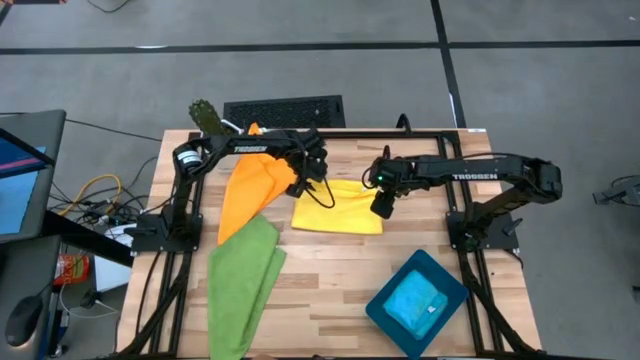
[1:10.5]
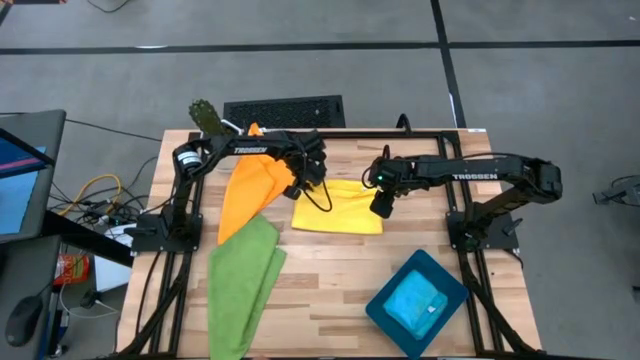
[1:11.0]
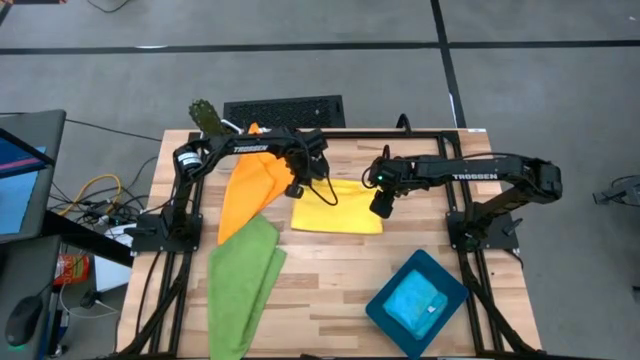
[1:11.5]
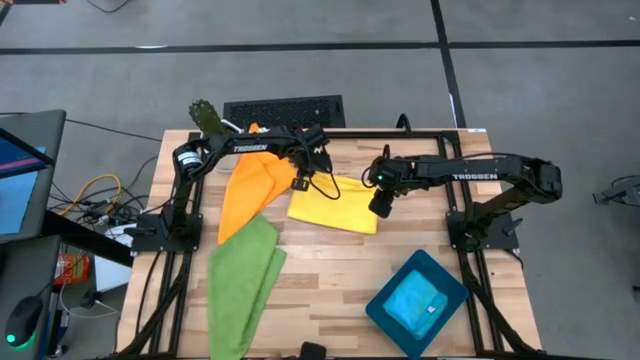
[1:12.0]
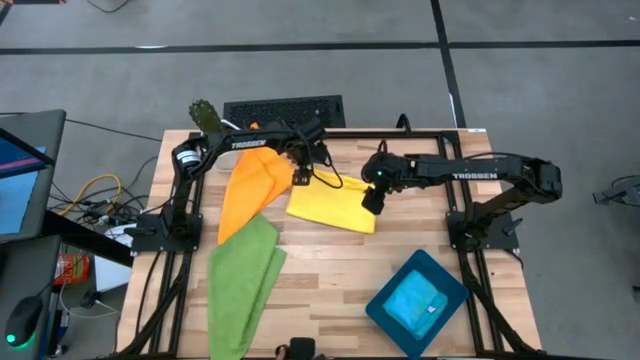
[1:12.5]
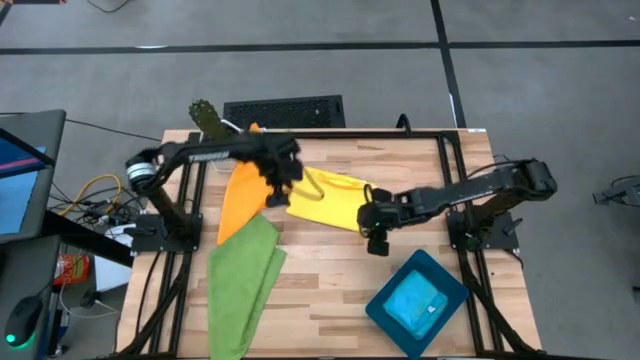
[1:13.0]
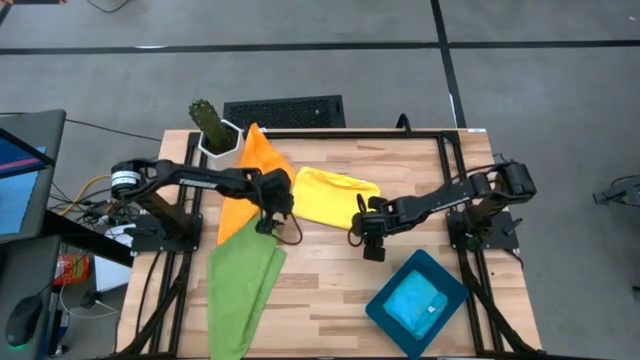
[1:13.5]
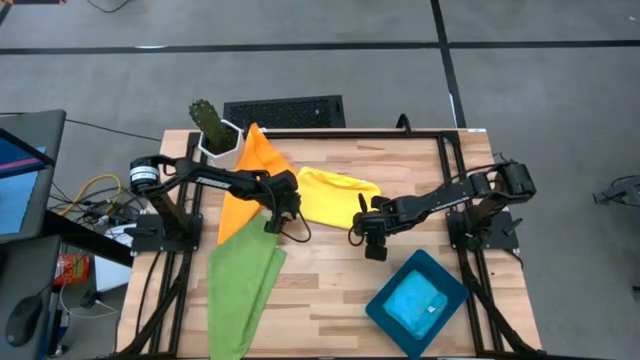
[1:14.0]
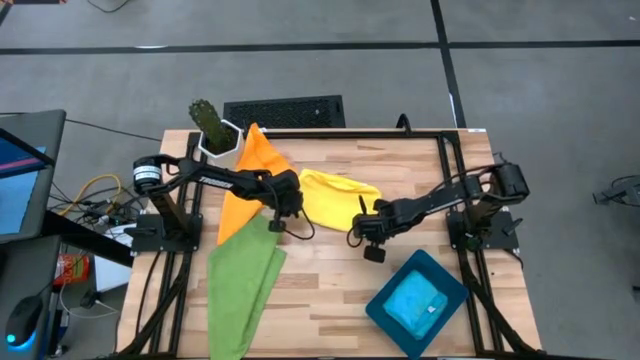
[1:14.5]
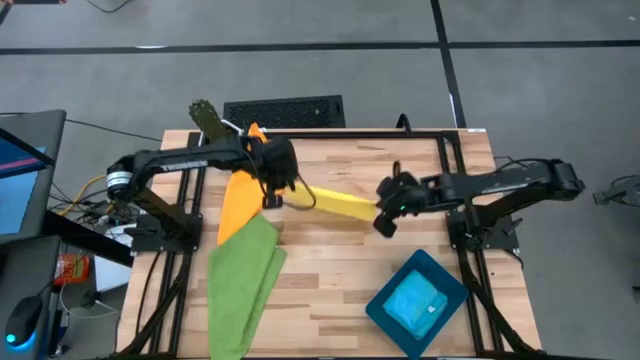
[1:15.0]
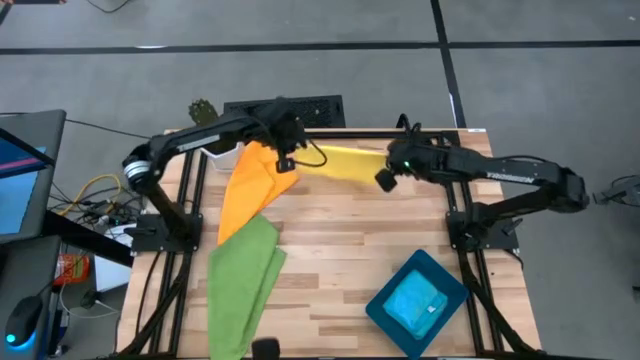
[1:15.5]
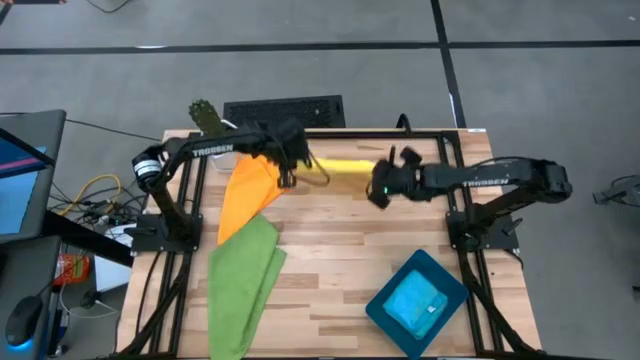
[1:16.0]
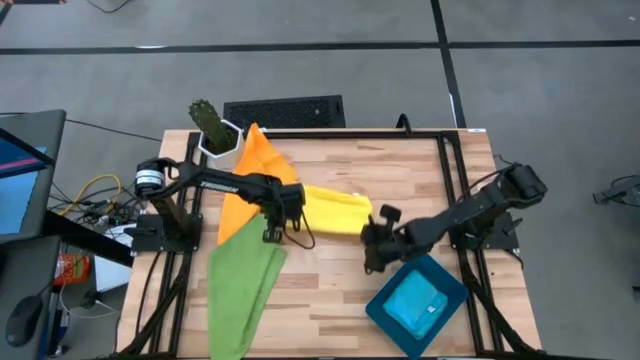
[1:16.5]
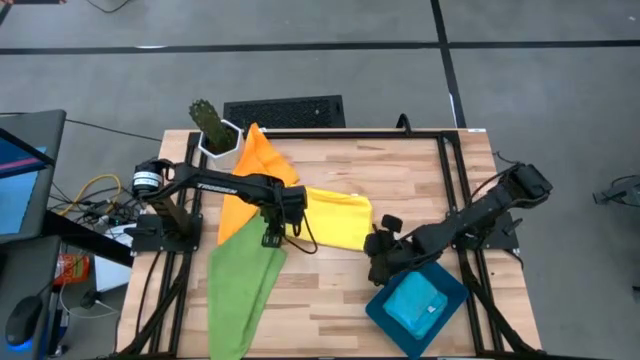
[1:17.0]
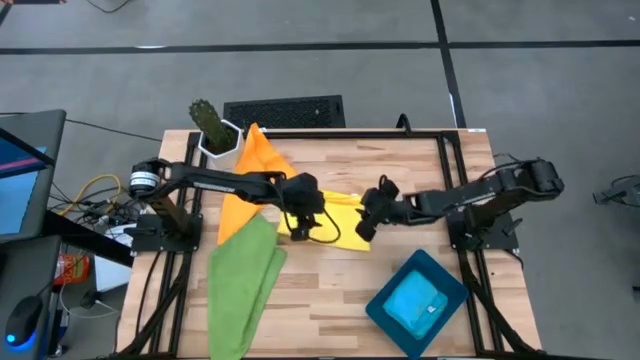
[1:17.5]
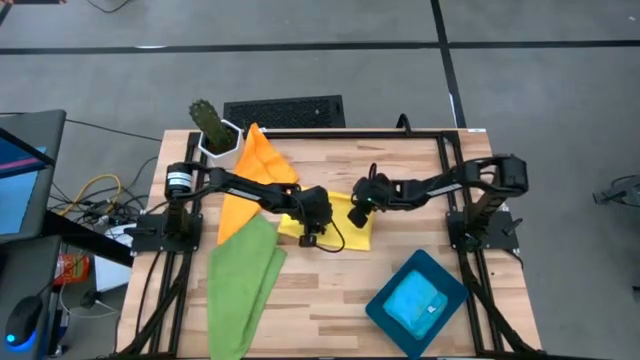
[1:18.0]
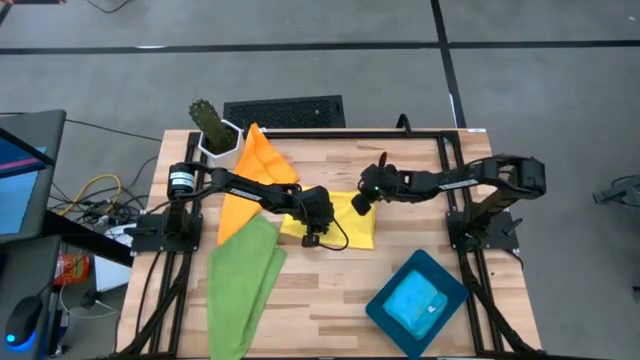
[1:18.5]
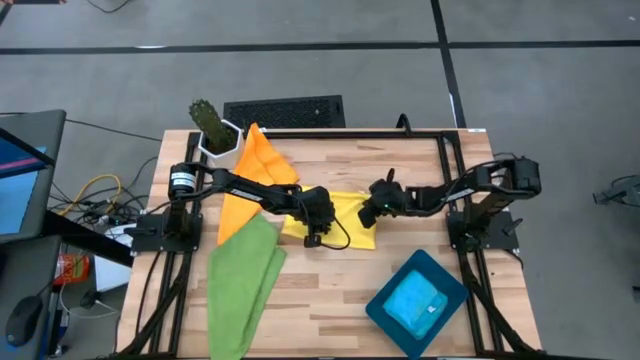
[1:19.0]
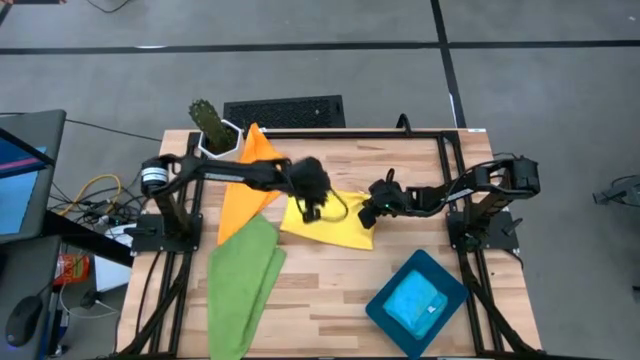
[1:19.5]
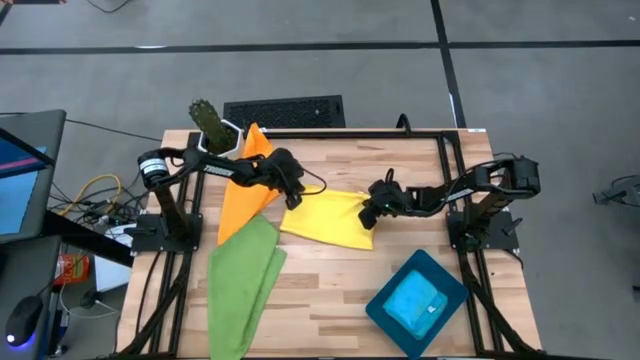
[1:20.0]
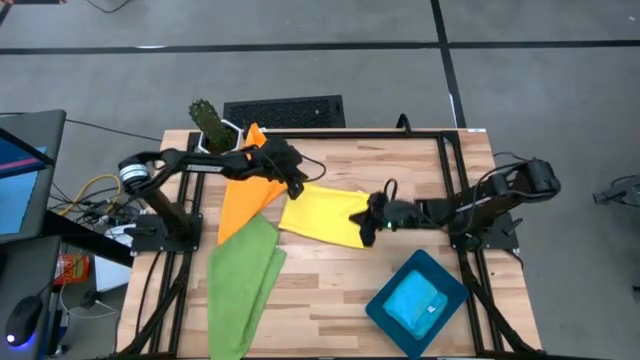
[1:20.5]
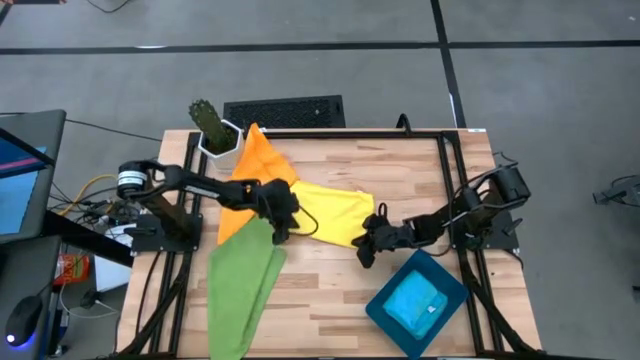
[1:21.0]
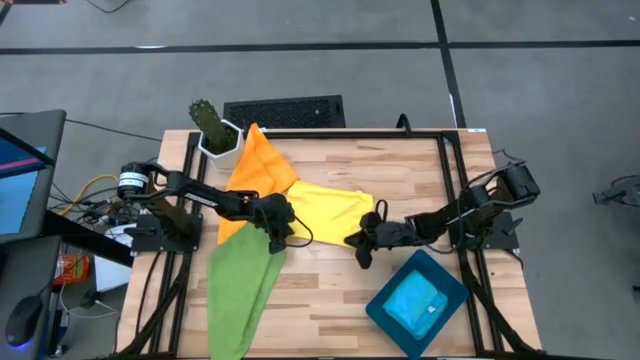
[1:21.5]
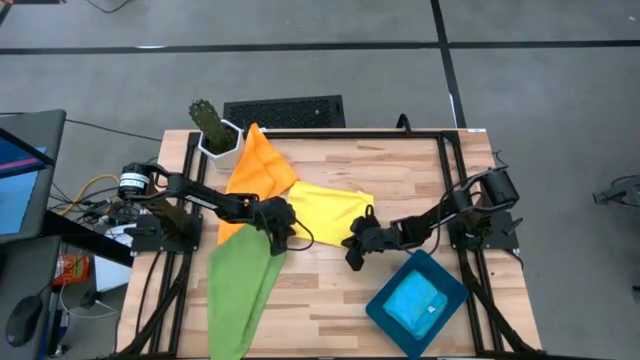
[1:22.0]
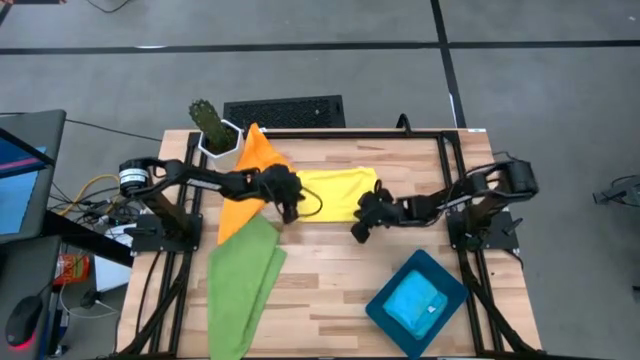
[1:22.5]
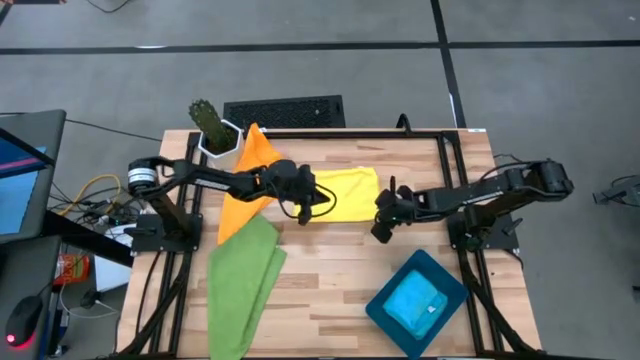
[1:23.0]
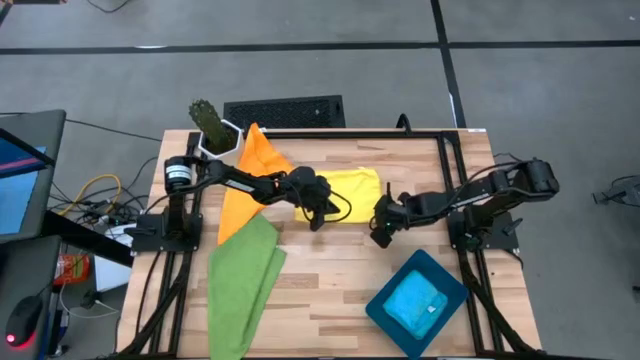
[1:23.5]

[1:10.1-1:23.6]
Task: Fold microfiber towels
Fold the yellow microfiber towel

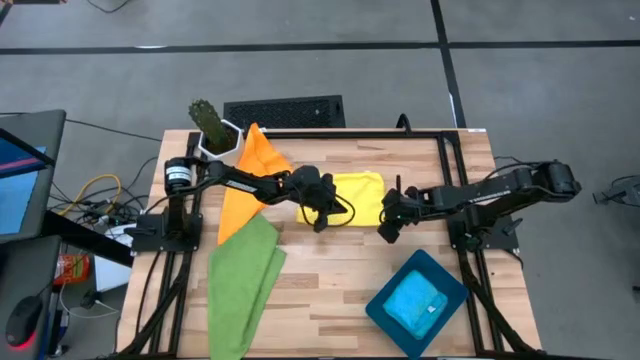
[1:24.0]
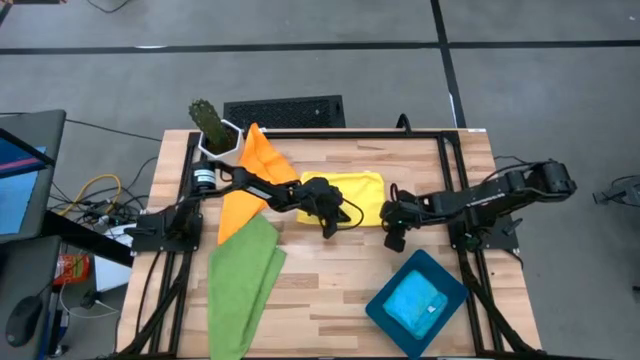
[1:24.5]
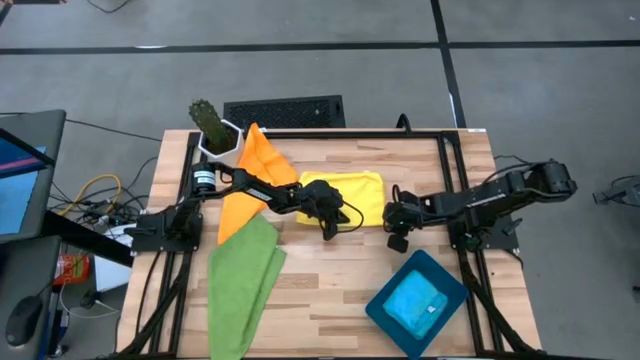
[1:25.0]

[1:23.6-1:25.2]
Fold the yellow microfiber towel

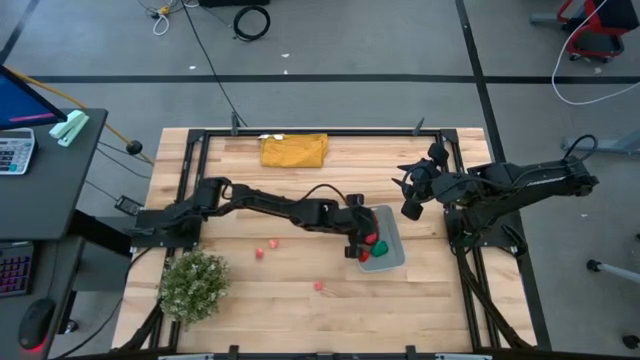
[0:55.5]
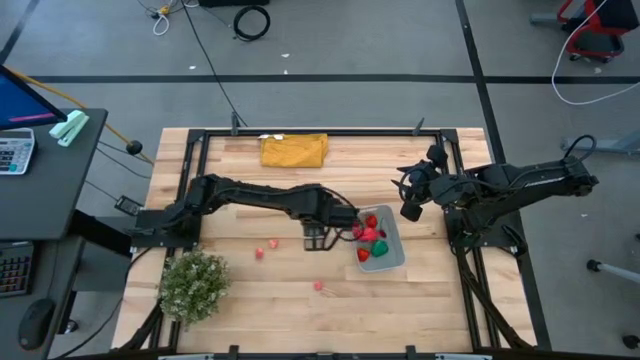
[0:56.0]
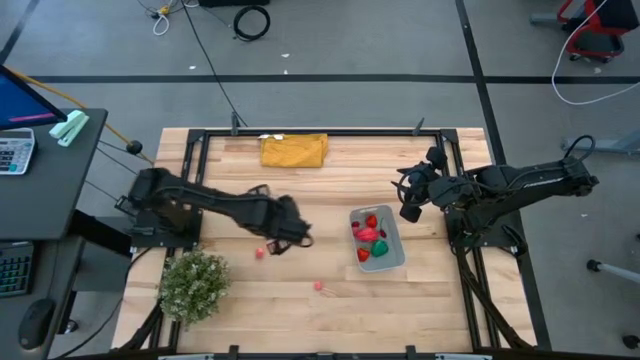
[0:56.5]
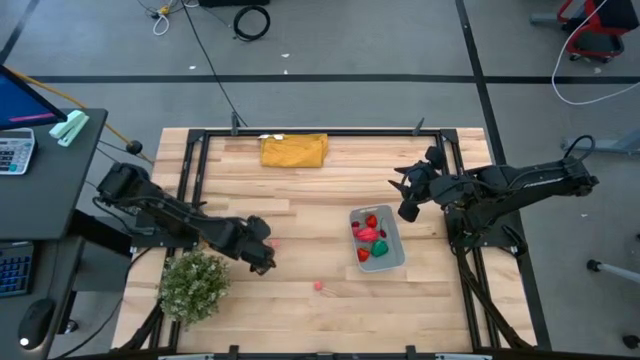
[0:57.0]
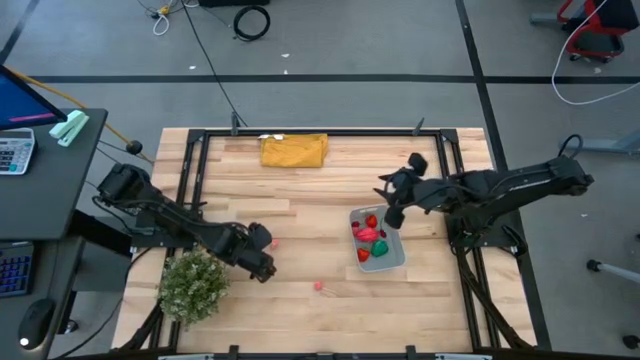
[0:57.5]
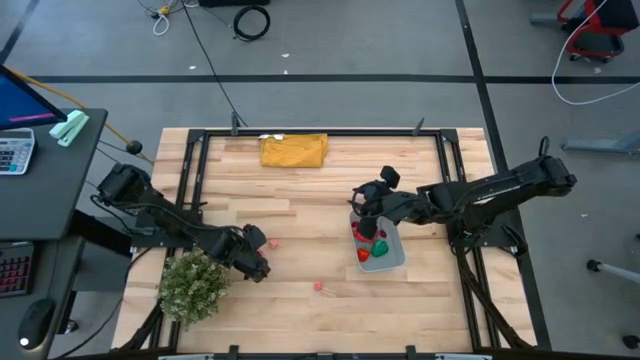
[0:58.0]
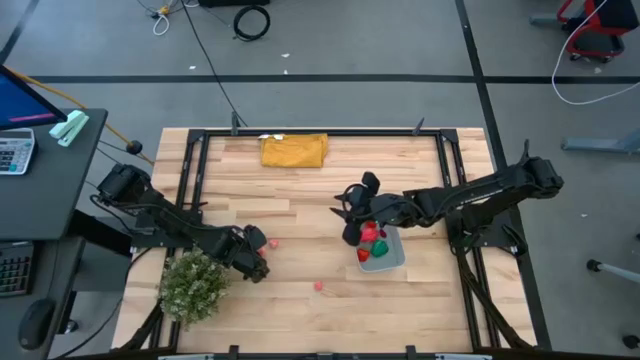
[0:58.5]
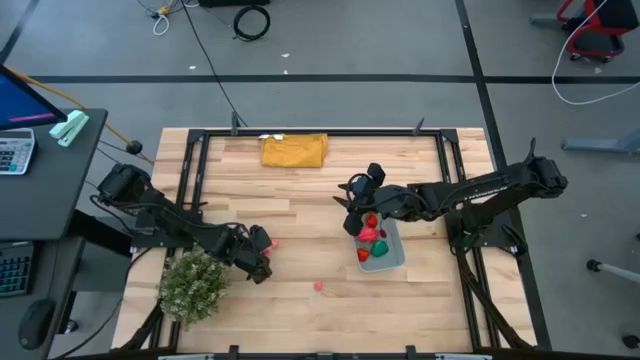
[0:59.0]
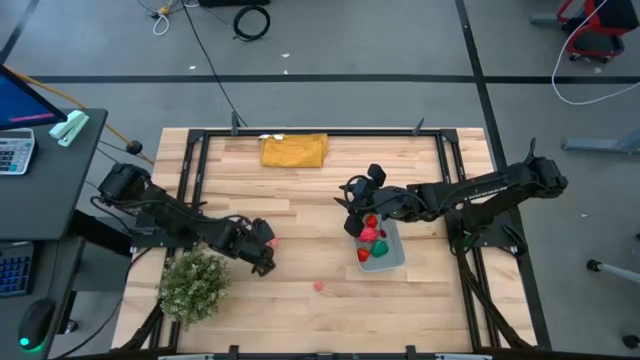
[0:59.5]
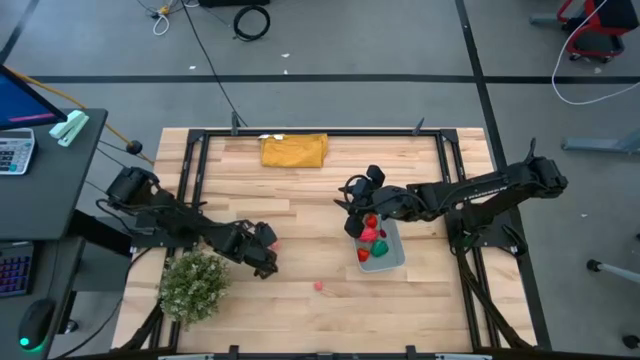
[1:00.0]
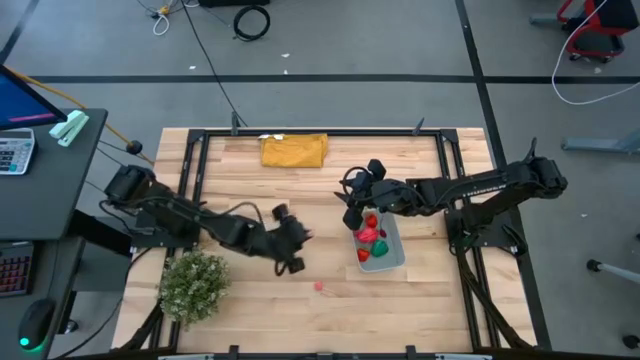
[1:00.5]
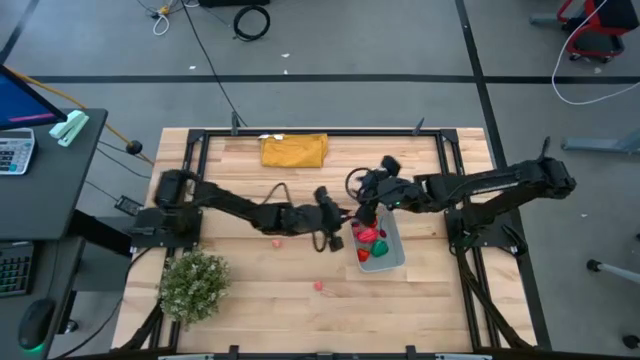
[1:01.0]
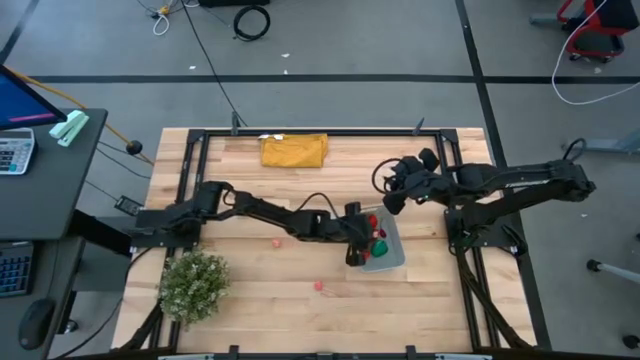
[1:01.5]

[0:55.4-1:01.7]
Task: Pick and placing Produce into tupperware
Put the pink peach into the gray bin
